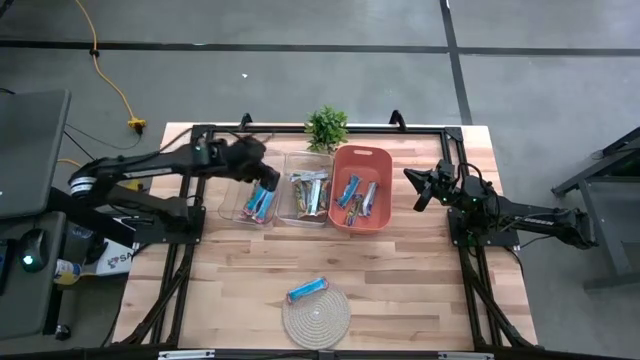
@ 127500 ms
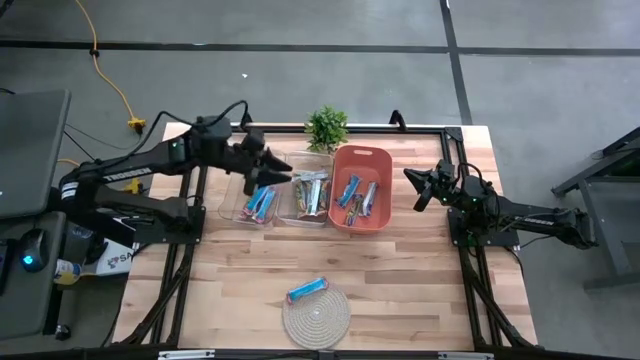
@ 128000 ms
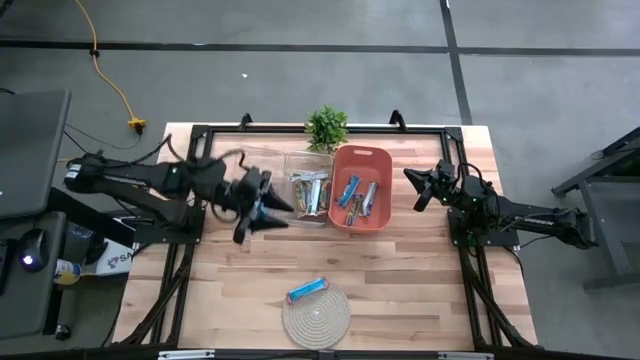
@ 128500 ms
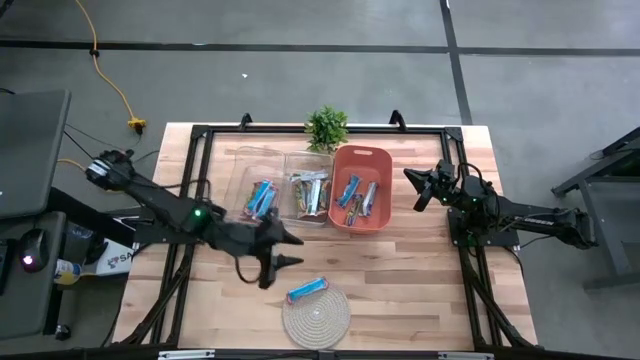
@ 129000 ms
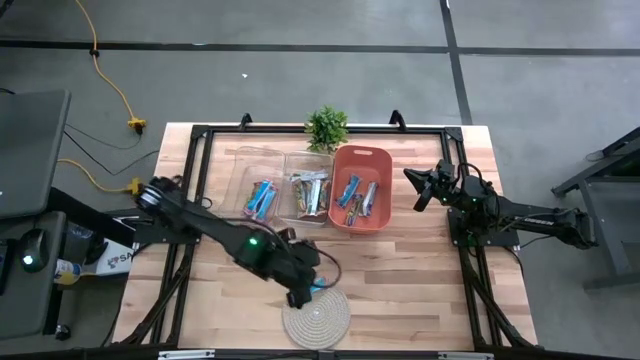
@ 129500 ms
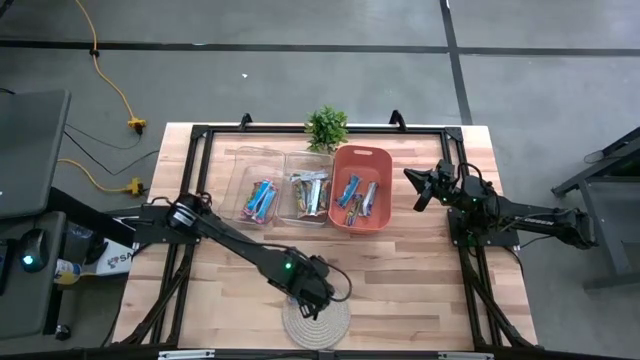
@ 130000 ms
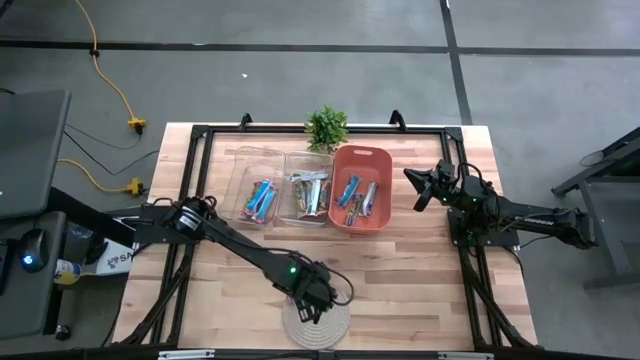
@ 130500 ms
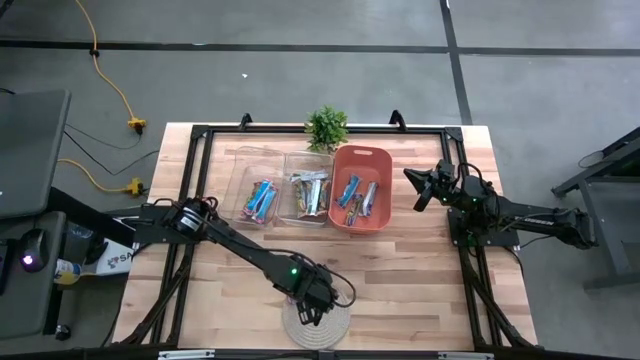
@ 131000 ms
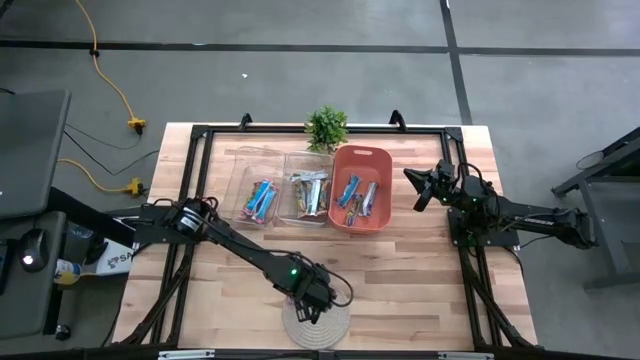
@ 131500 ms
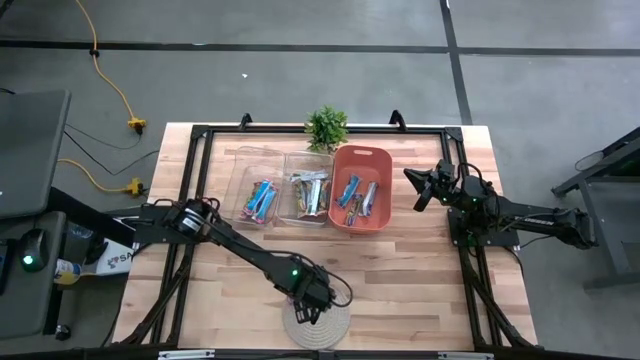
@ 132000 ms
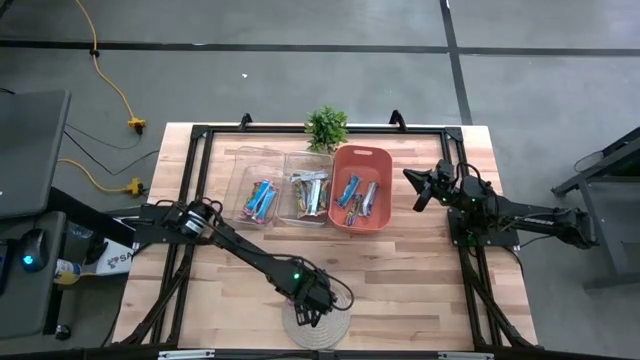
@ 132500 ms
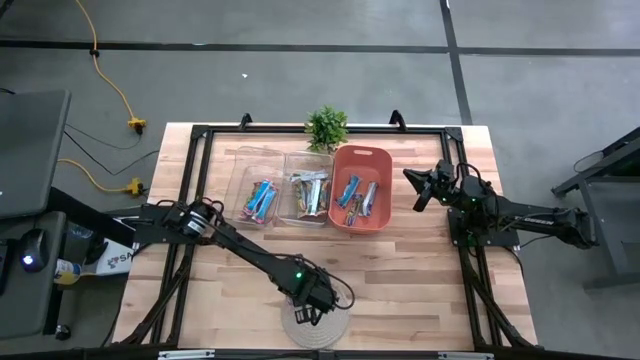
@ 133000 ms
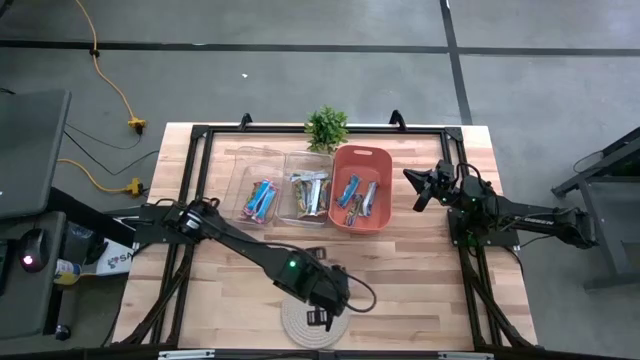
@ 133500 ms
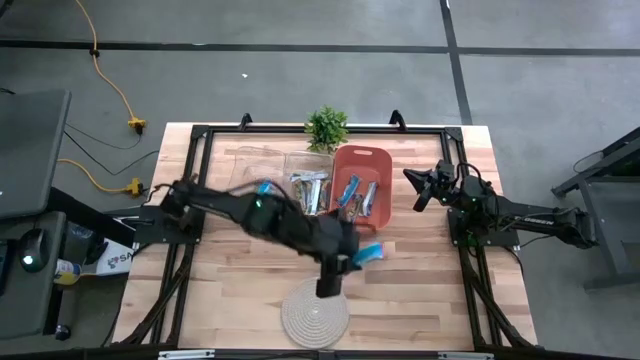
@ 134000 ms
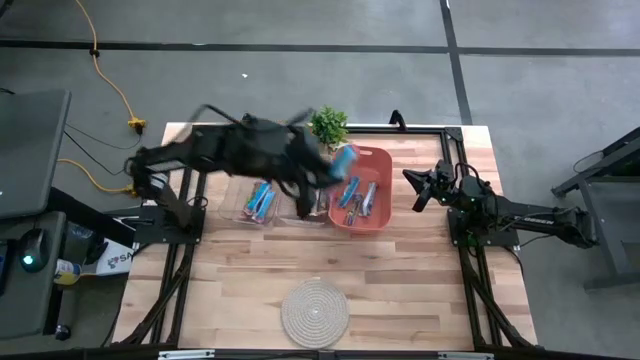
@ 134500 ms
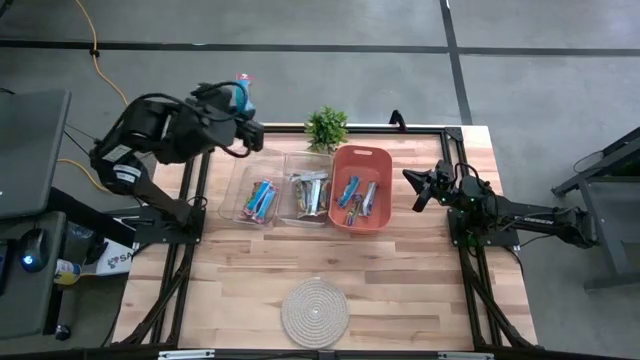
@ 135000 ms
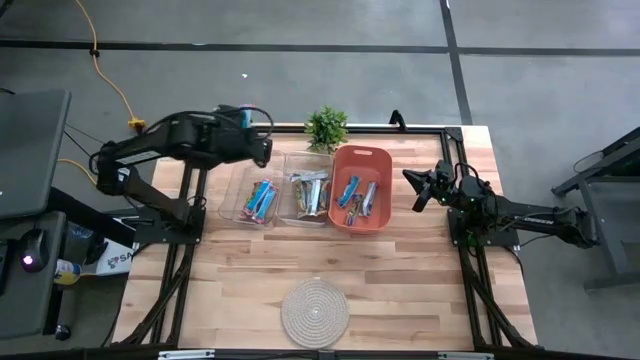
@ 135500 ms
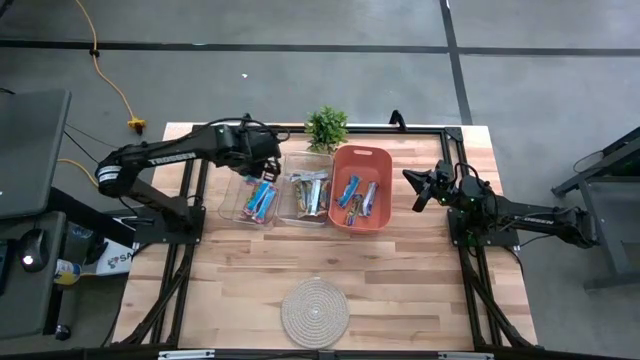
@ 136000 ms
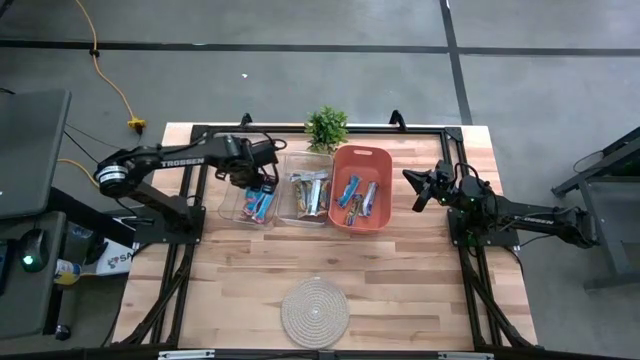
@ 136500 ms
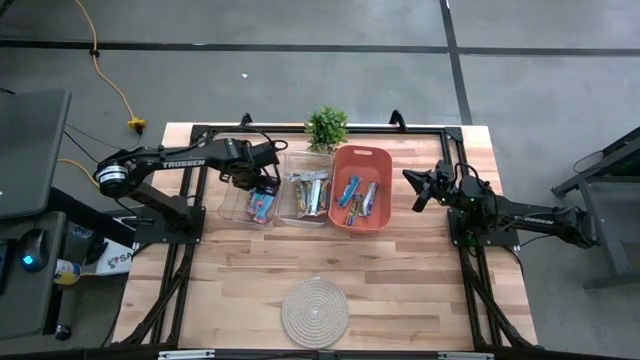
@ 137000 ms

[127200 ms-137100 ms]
Task: Pick and place Granola Bars by type
Put the red granola bar into the left transparent bin

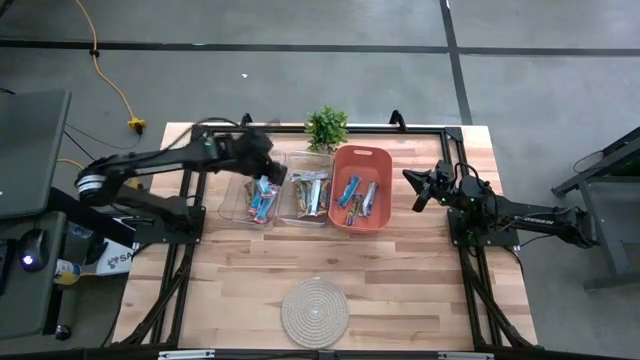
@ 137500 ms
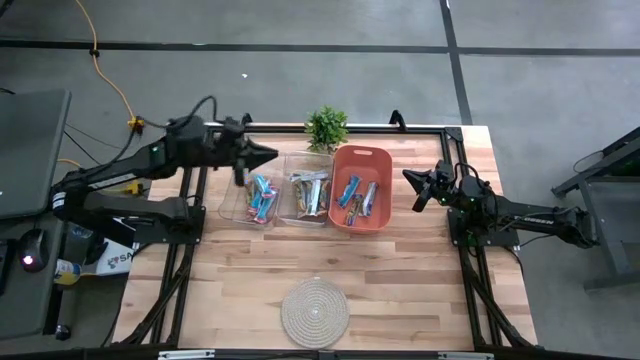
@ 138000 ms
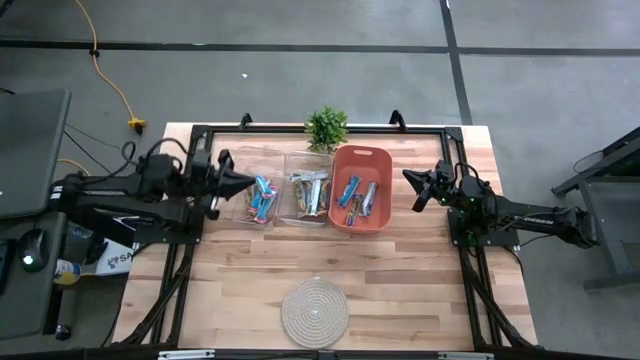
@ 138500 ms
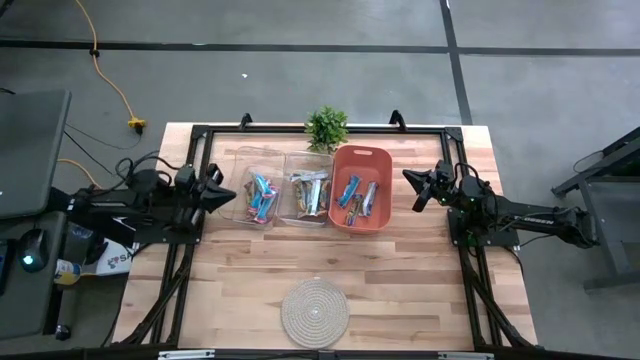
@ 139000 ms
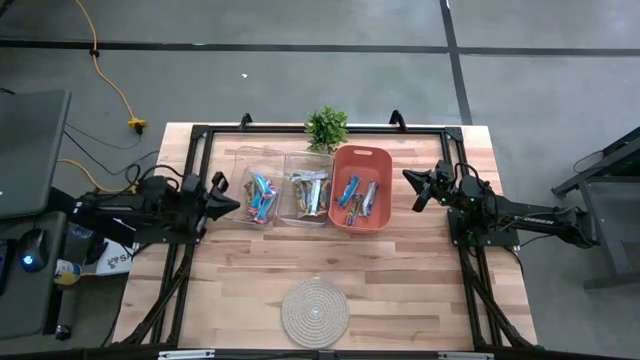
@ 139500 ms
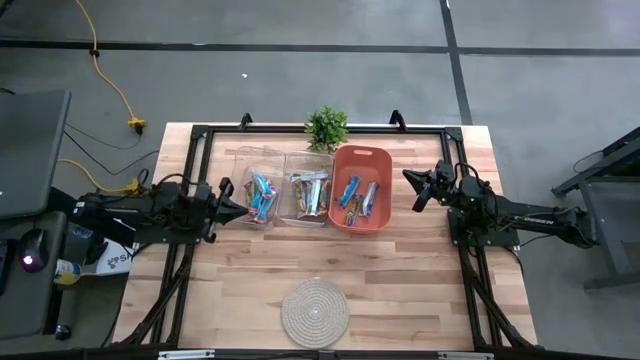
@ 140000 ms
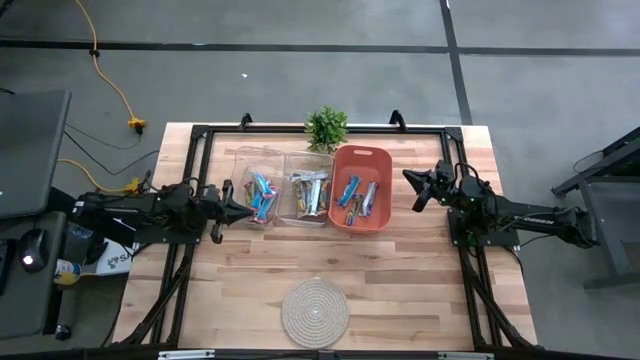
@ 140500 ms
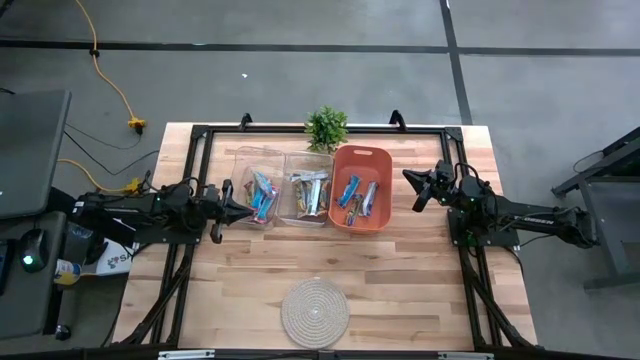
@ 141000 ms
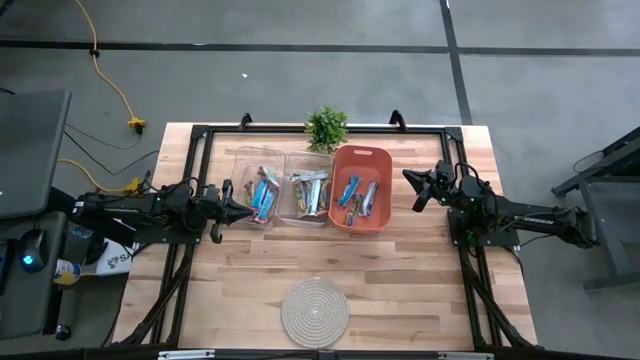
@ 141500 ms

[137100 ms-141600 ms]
Return To Home Position

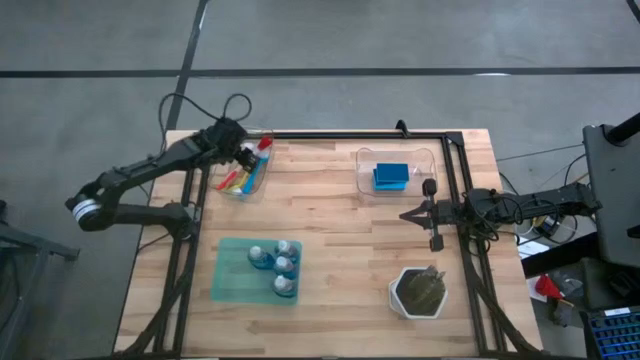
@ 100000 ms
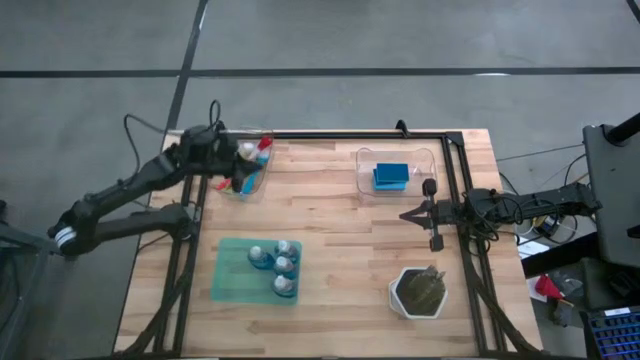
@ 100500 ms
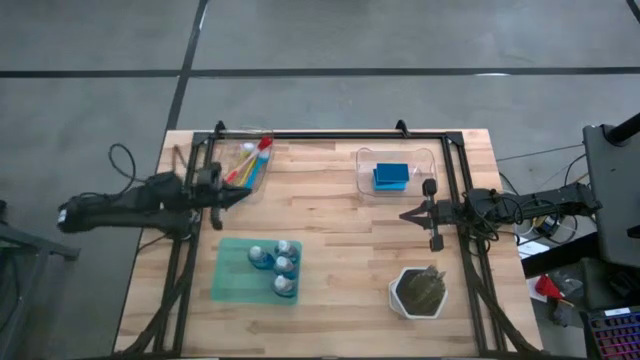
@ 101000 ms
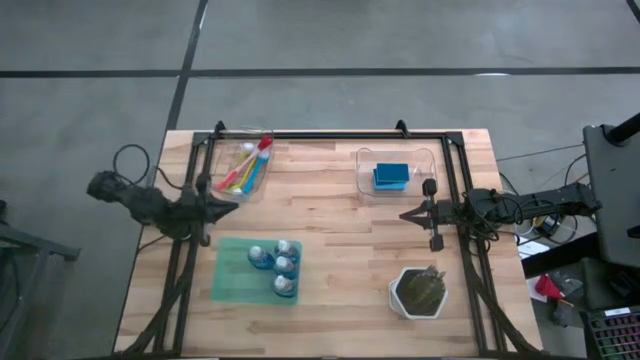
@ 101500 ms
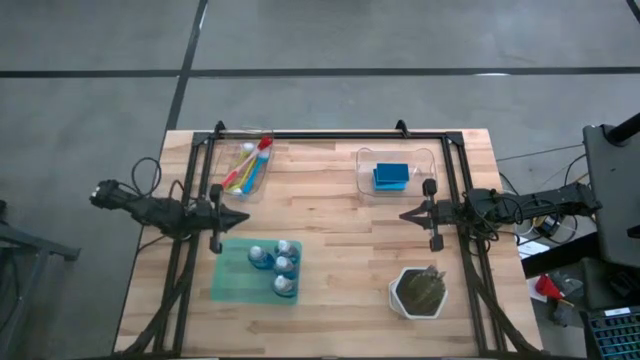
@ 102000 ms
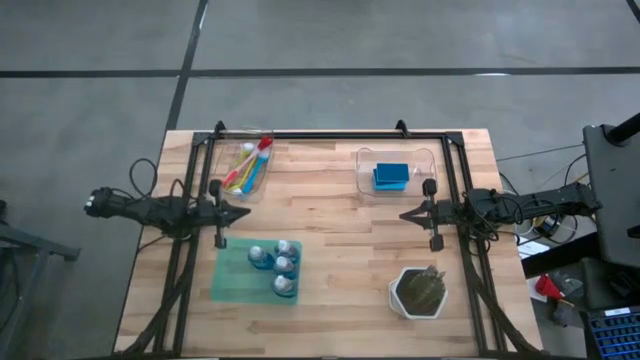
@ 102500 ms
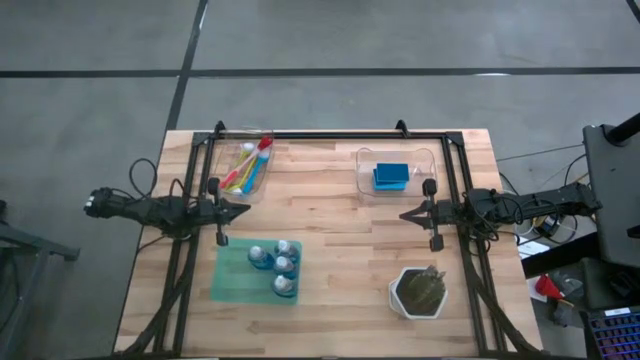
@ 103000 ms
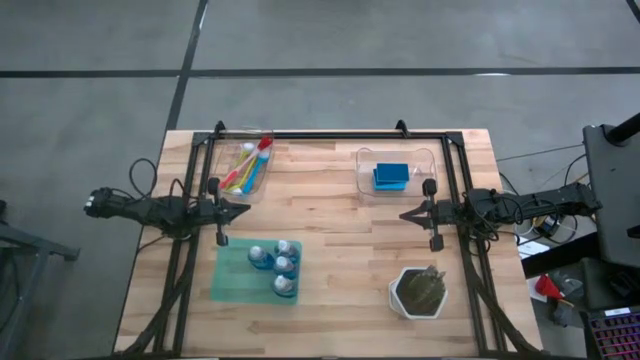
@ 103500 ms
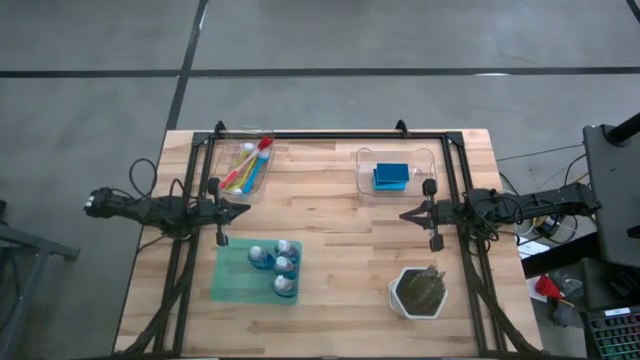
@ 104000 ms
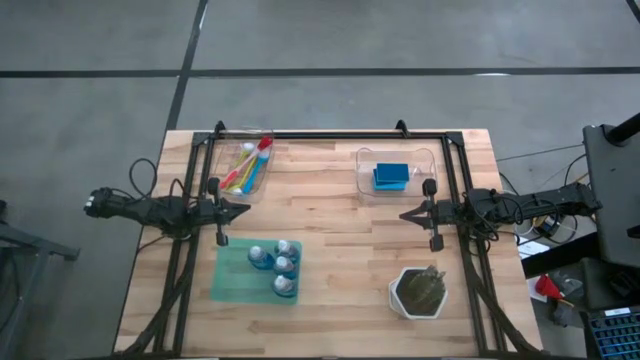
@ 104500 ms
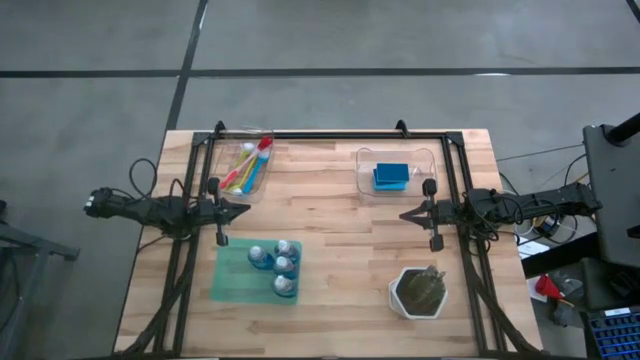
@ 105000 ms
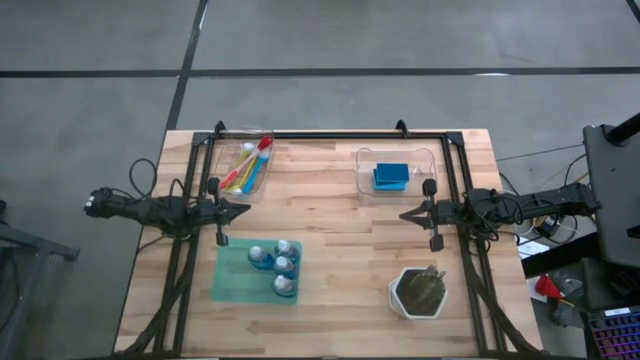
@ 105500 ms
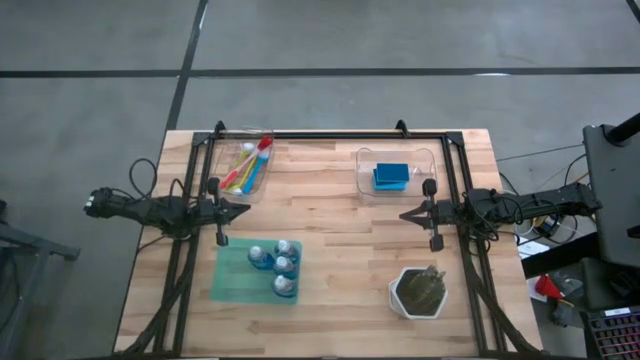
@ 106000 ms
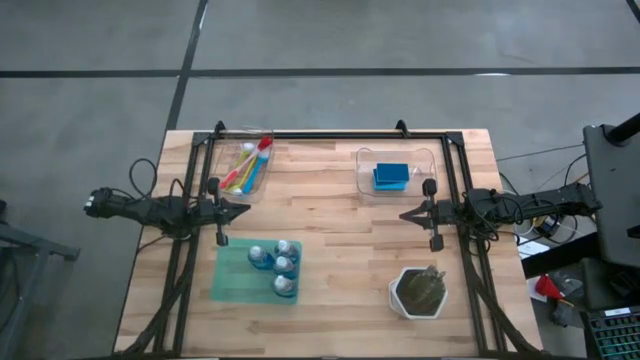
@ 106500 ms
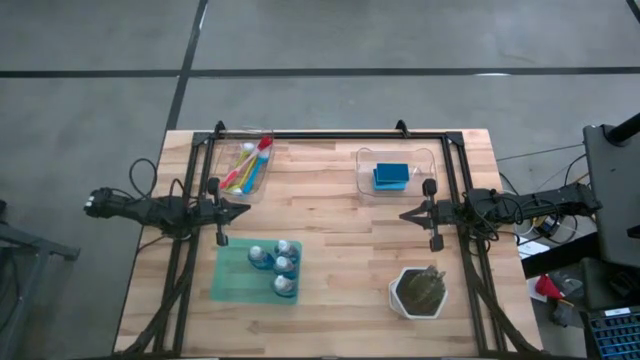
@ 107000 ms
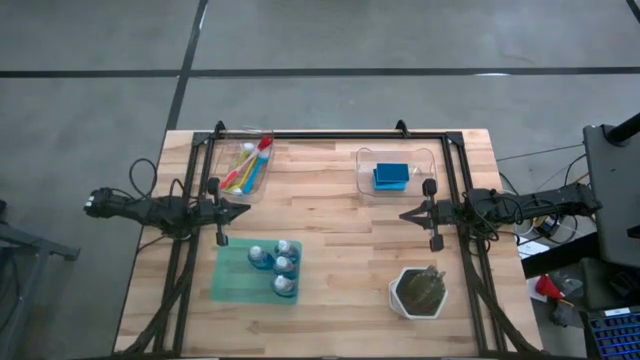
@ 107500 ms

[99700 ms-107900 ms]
Task: Pick & Place Kitchen Sink Supplies
Return to Home Position
